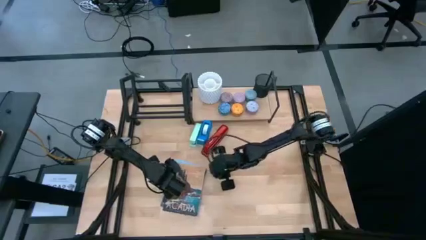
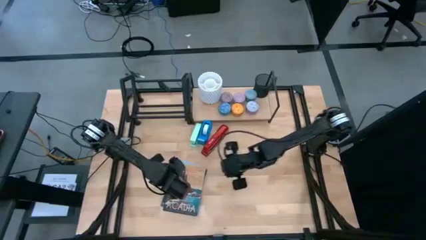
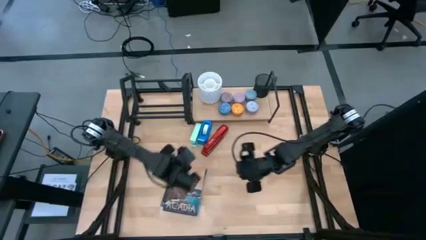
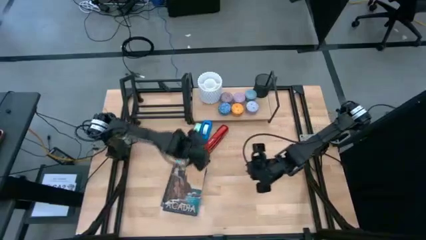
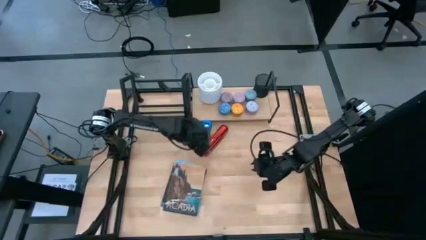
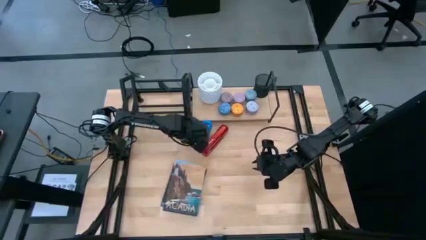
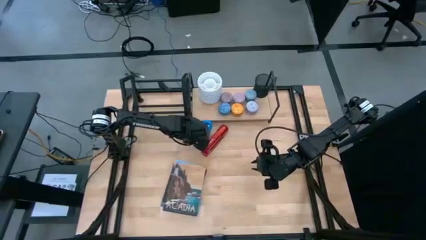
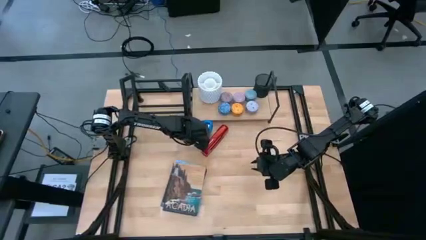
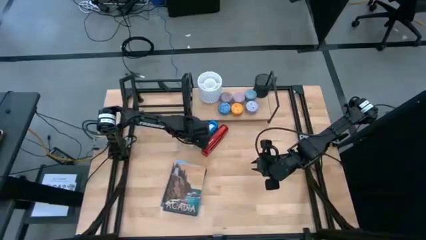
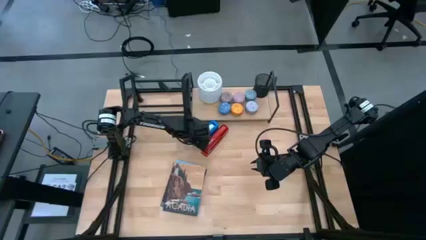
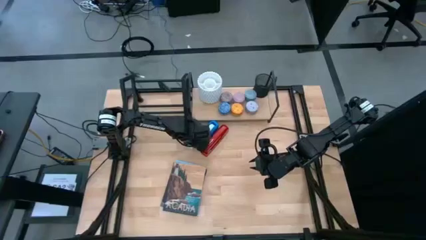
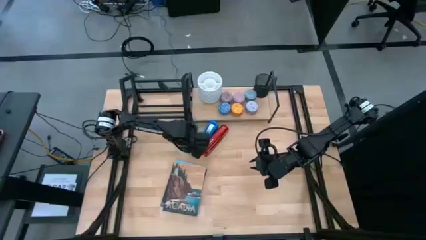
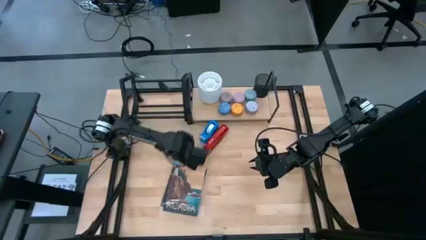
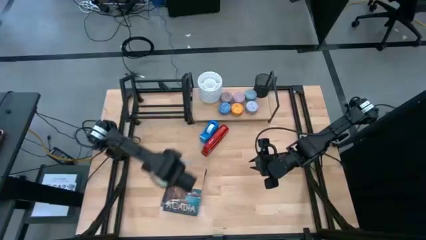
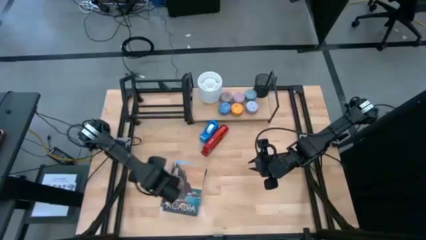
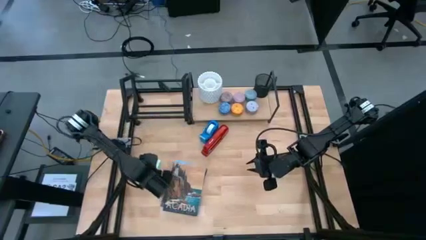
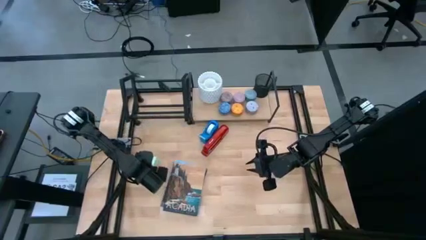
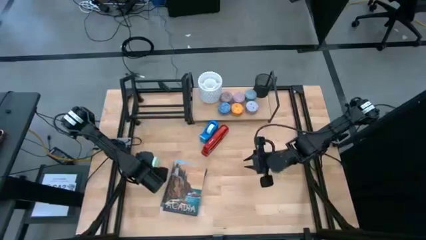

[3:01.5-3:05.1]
Task: Stock shelves
Remove the green stapler from under the left of the shelf

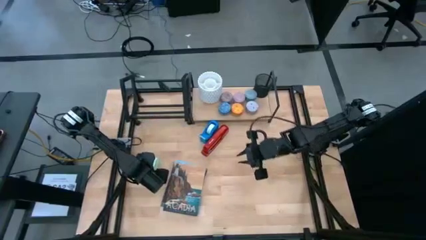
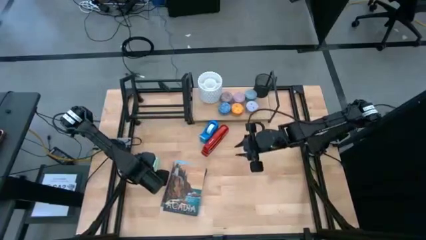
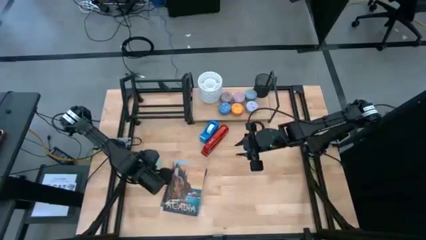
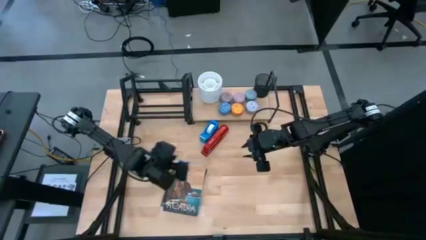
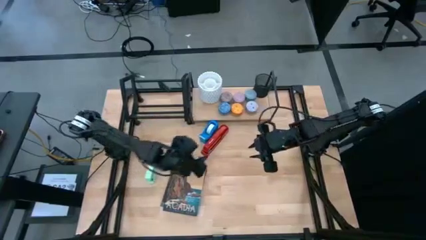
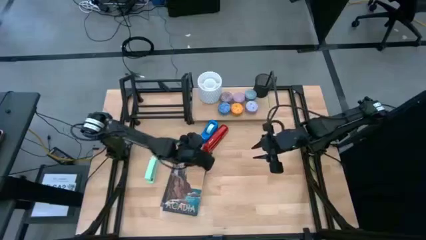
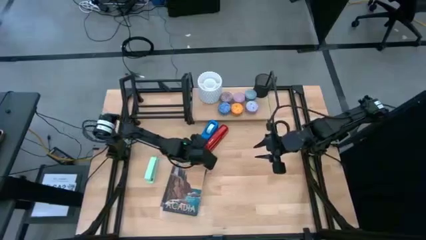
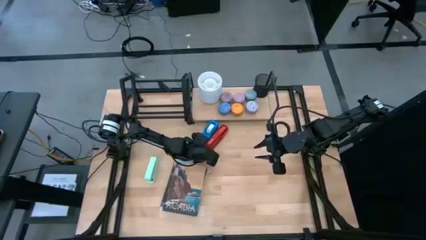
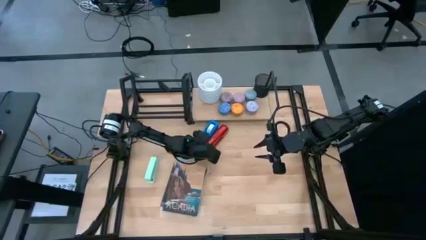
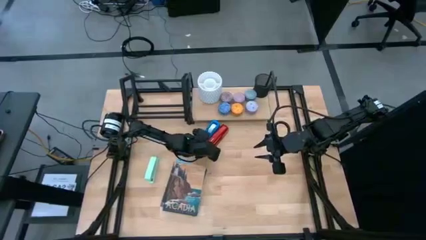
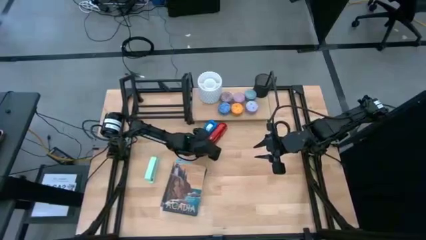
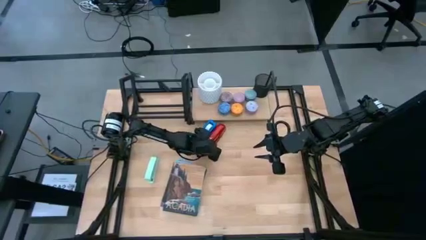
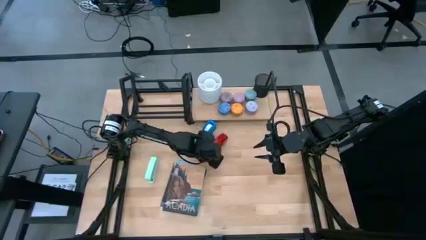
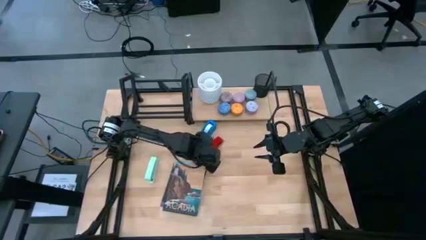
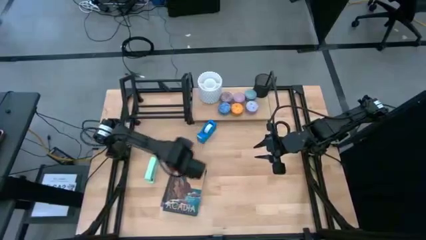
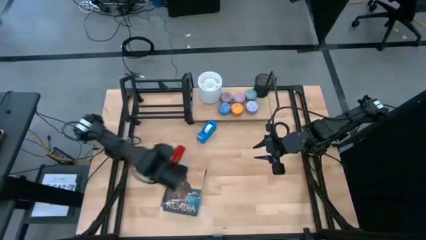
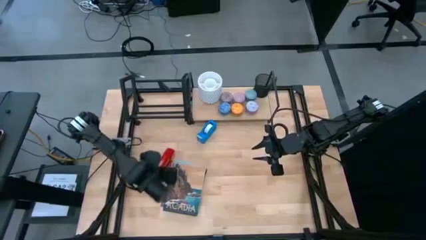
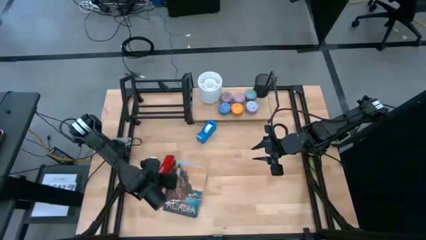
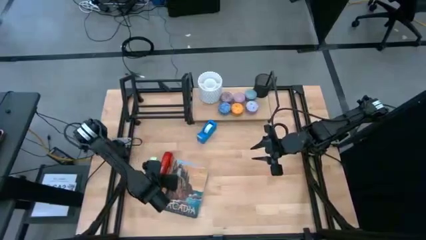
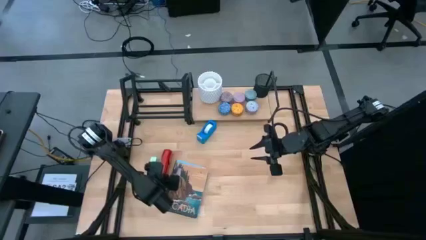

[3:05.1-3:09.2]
Remove the red stapler from under the left of the shelf

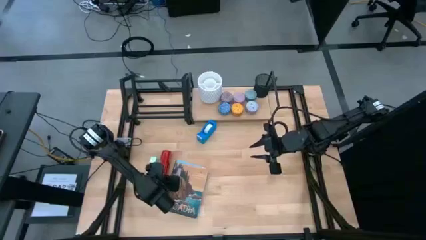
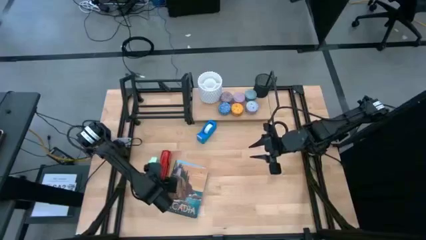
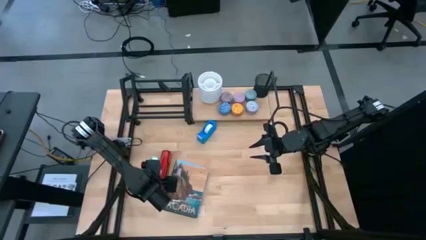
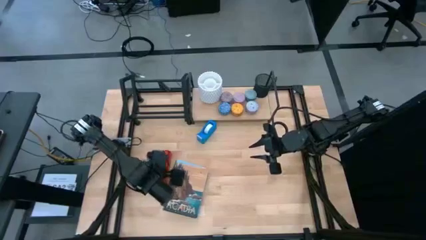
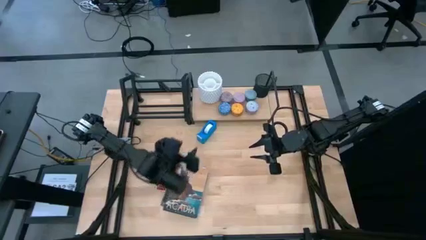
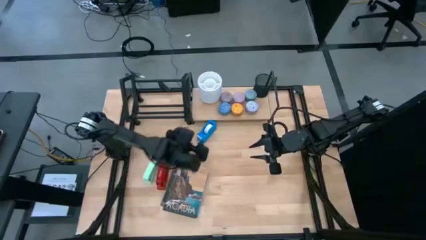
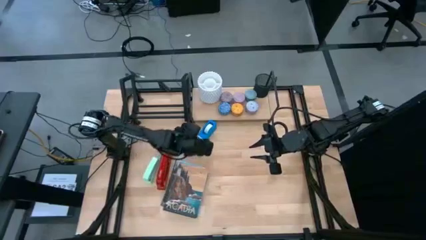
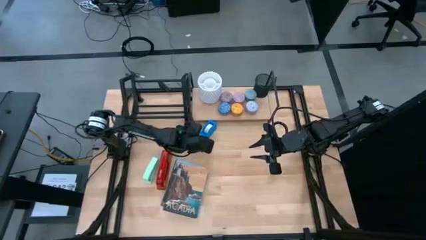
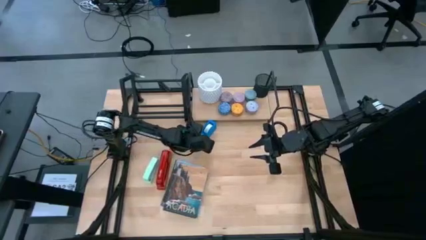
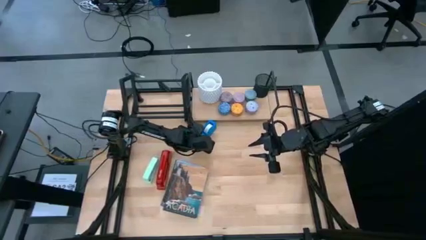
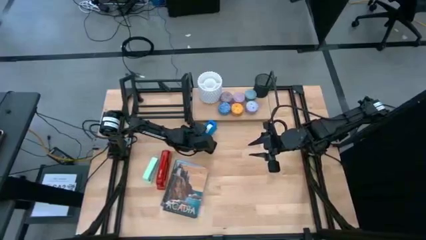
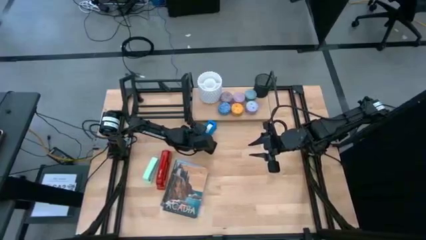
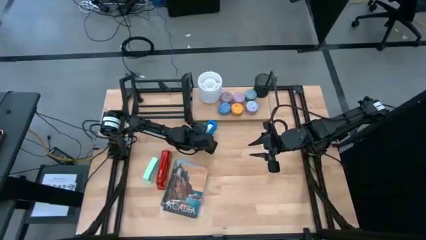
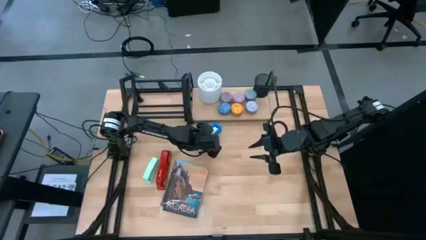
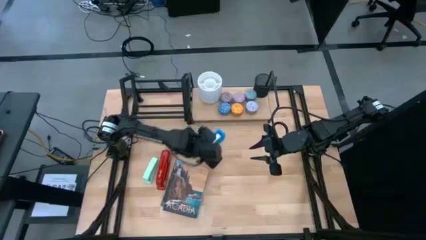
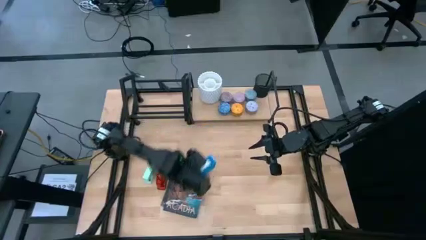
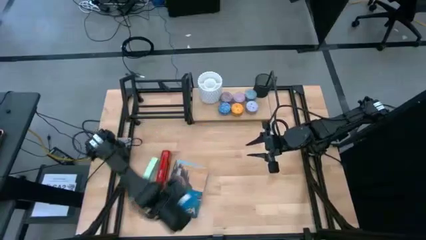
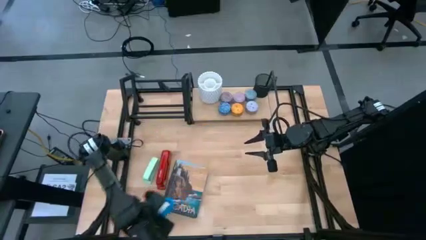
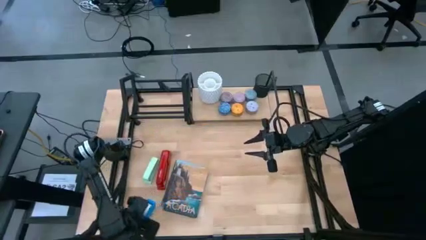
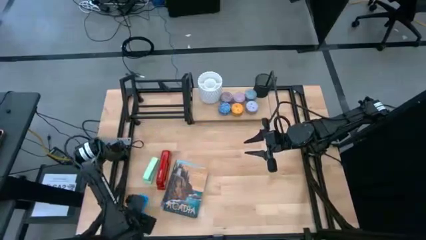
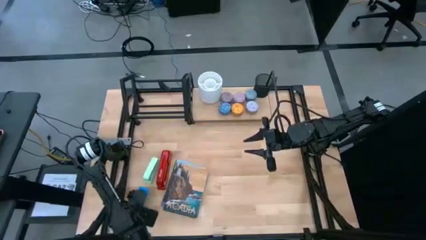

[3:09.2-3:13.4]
Remove the blue tape dispenser from under the shelf

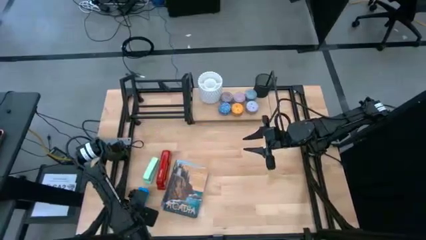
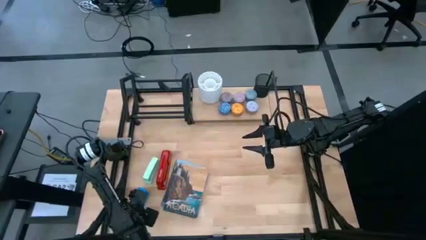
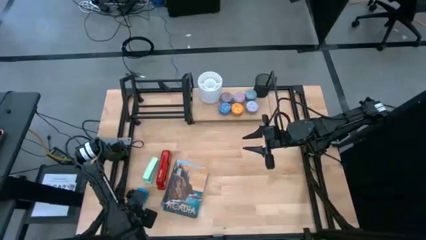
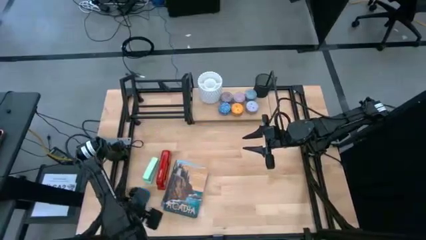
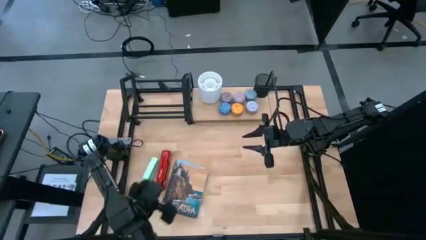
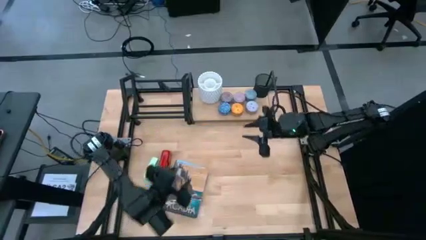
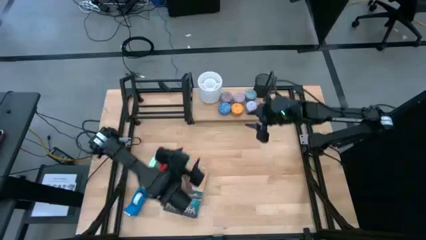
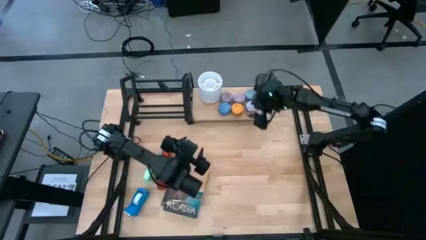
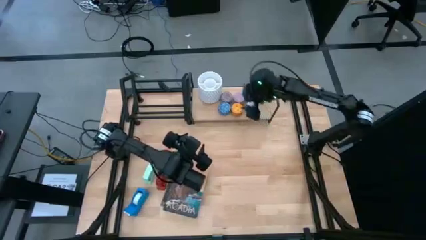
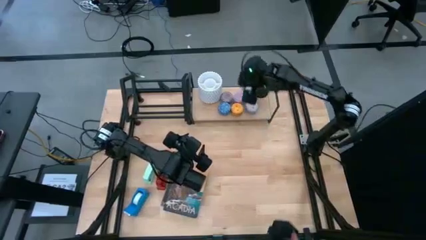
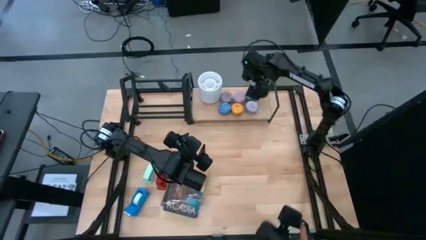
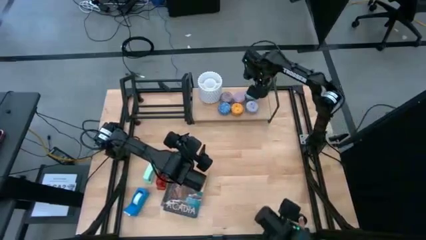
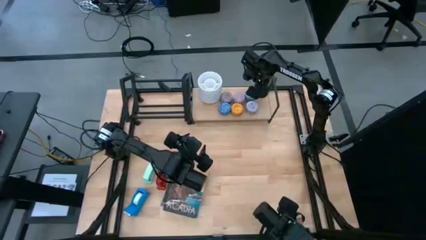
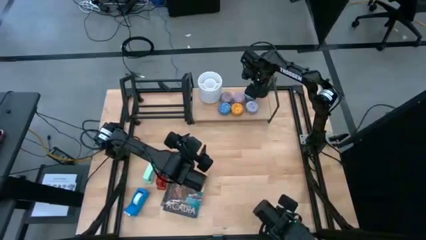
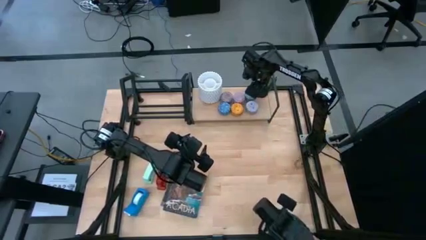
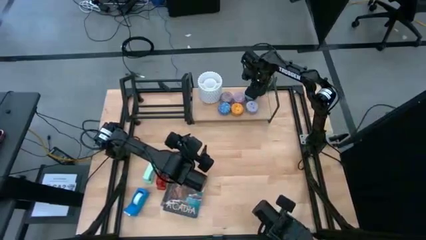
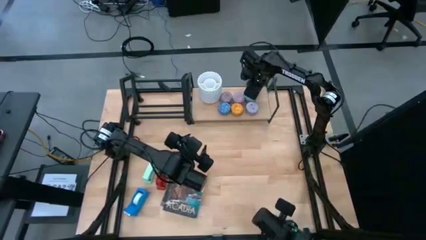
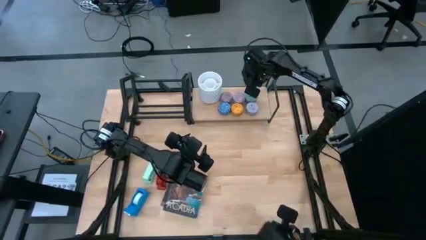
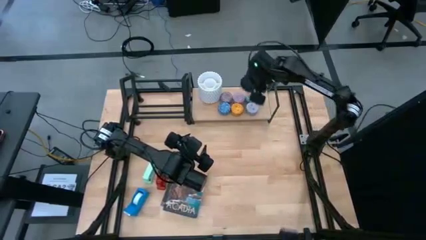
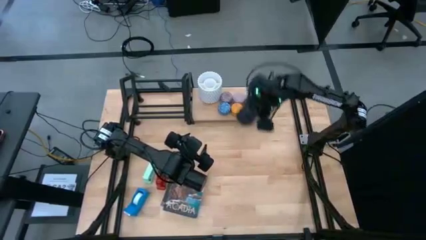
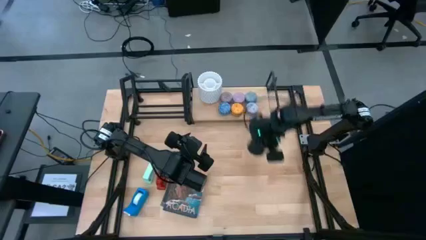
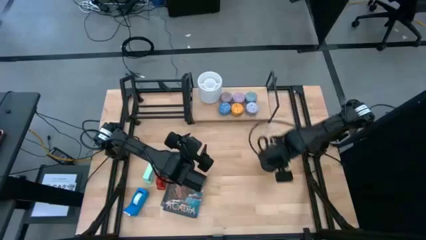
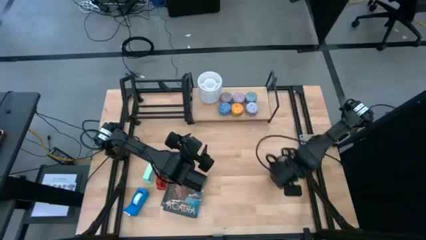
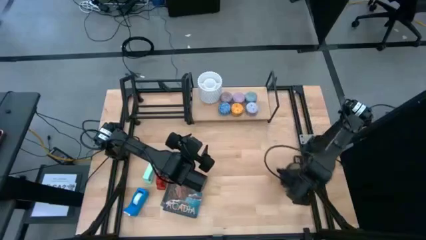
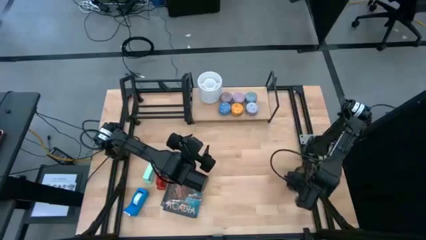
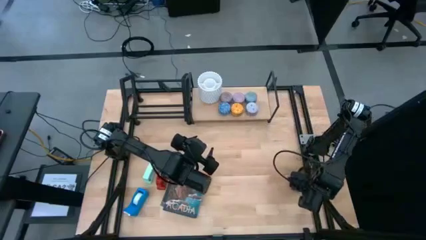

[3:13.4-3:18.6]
Remove the black pen holder from the shelf
